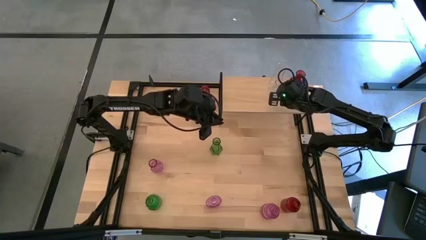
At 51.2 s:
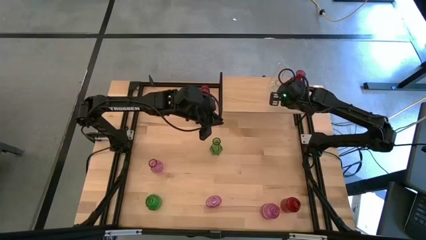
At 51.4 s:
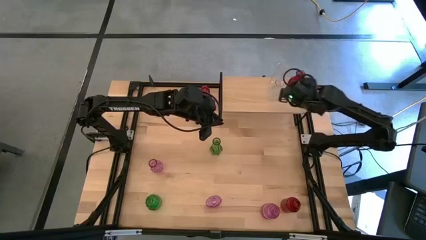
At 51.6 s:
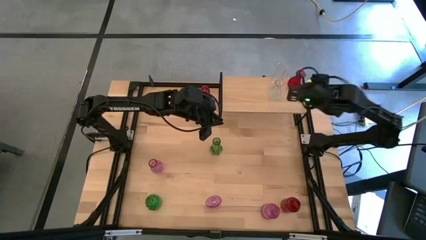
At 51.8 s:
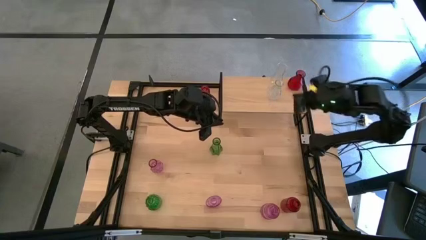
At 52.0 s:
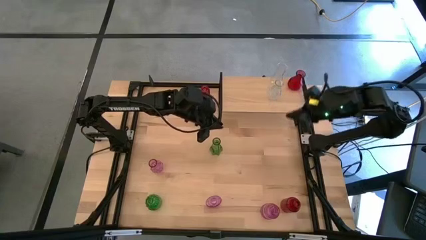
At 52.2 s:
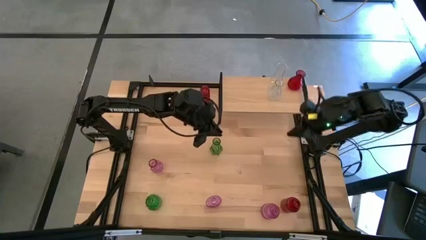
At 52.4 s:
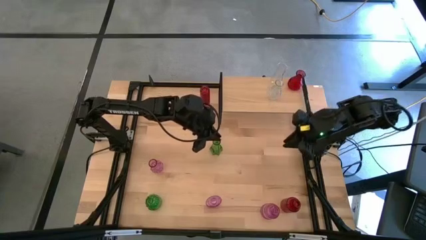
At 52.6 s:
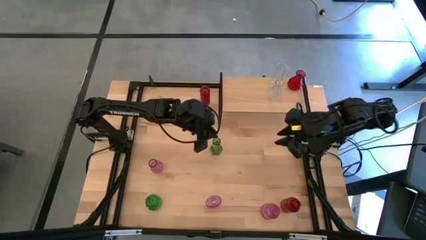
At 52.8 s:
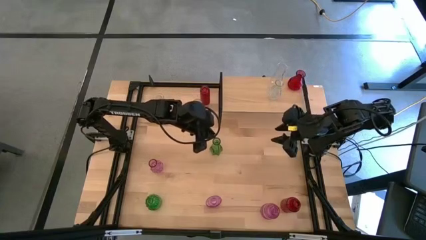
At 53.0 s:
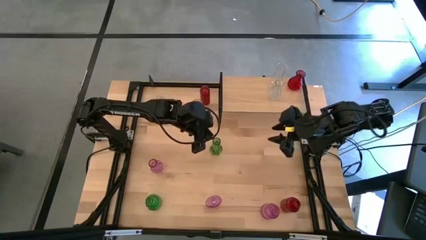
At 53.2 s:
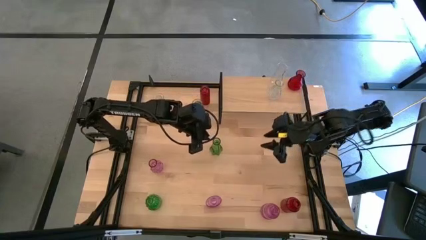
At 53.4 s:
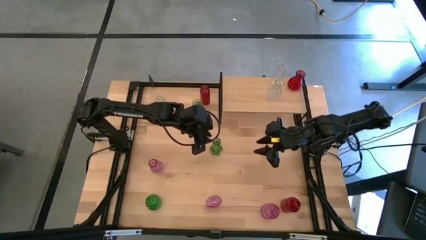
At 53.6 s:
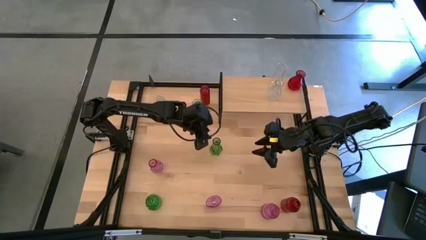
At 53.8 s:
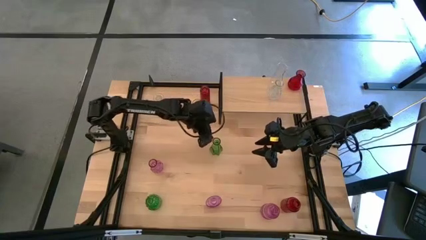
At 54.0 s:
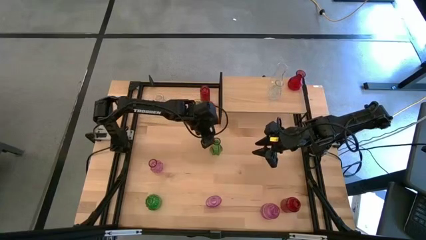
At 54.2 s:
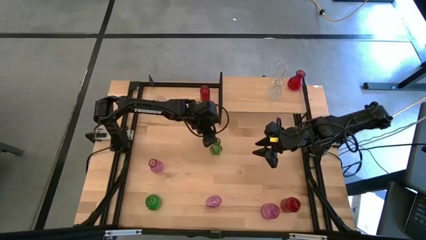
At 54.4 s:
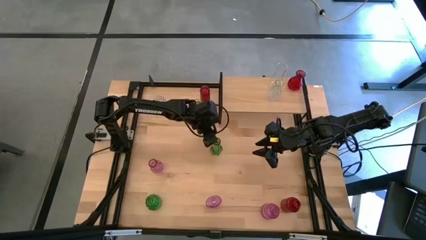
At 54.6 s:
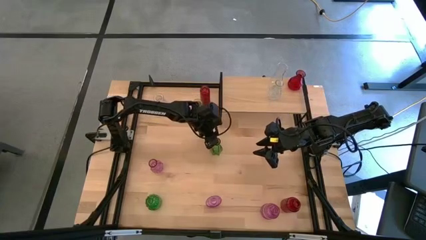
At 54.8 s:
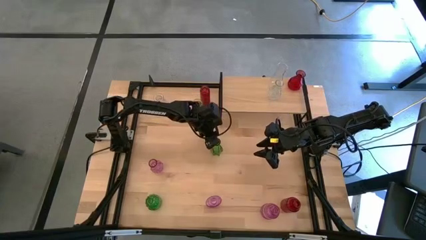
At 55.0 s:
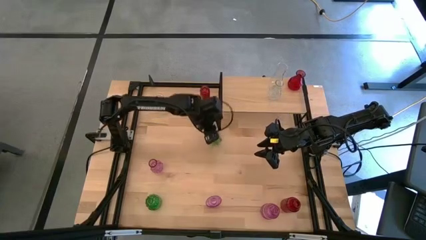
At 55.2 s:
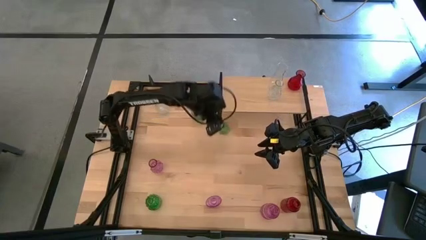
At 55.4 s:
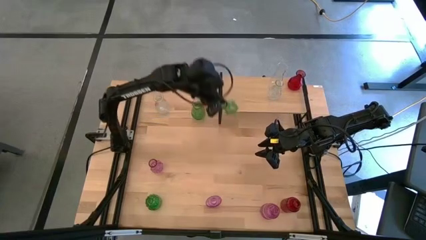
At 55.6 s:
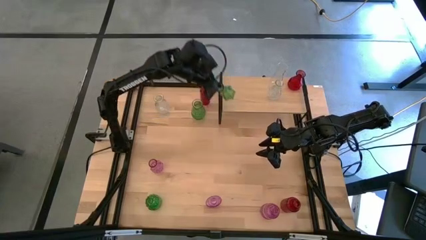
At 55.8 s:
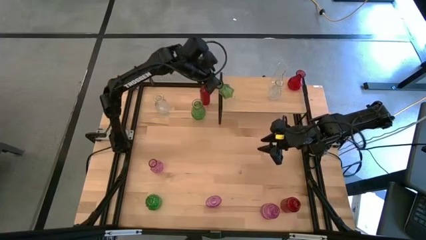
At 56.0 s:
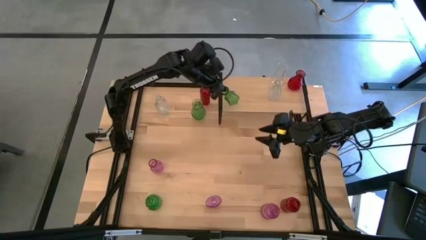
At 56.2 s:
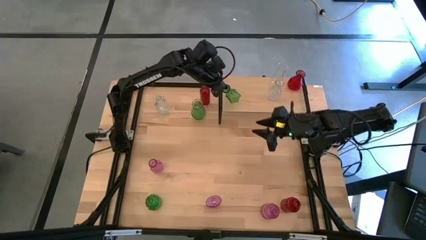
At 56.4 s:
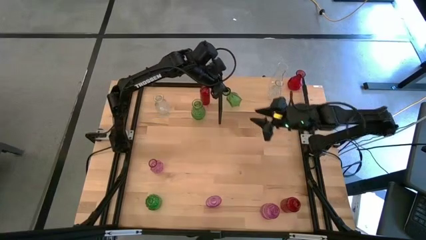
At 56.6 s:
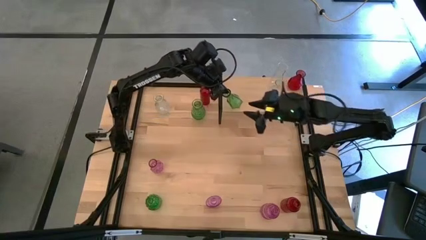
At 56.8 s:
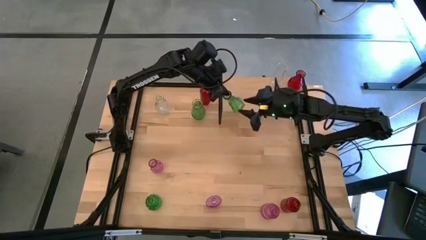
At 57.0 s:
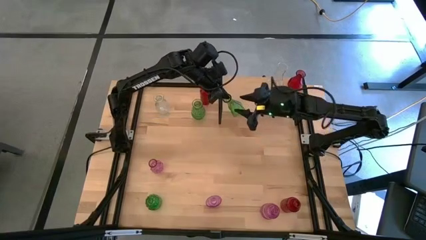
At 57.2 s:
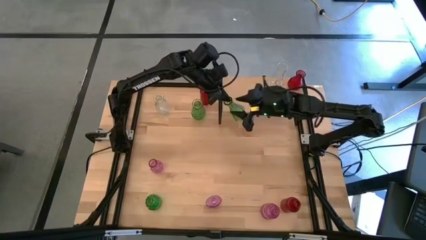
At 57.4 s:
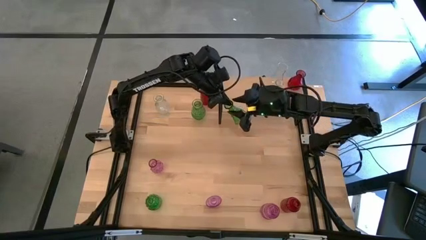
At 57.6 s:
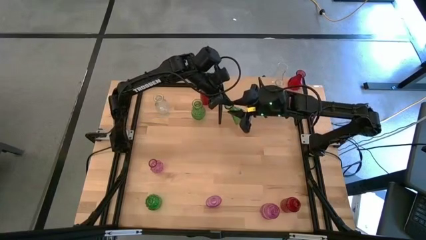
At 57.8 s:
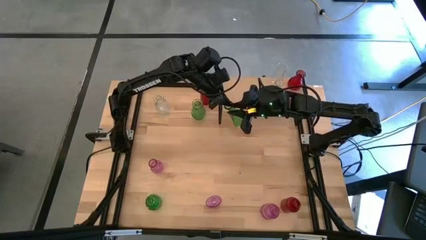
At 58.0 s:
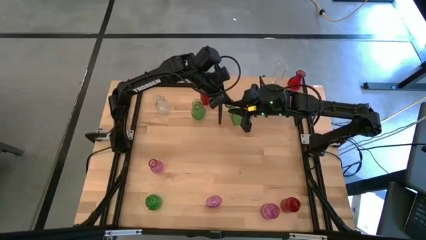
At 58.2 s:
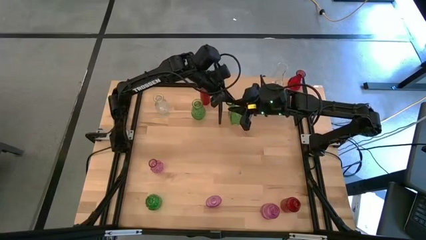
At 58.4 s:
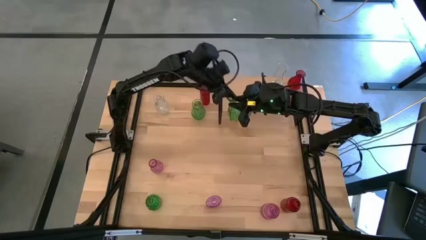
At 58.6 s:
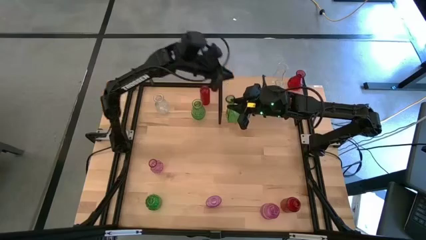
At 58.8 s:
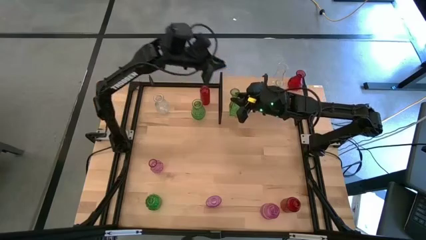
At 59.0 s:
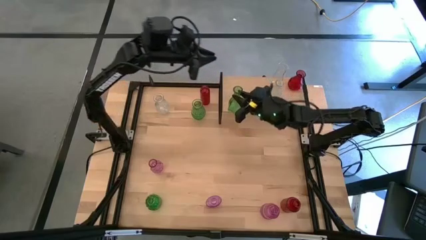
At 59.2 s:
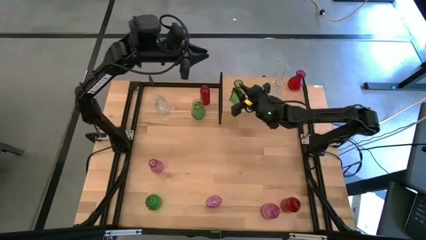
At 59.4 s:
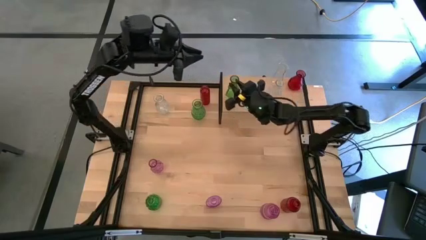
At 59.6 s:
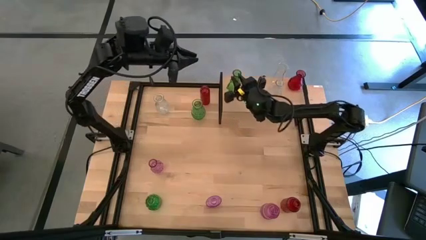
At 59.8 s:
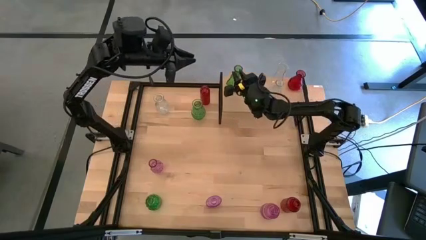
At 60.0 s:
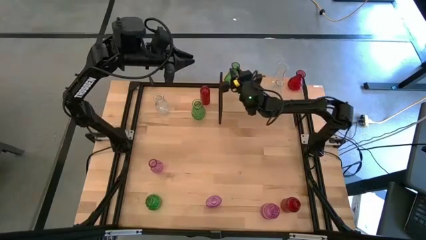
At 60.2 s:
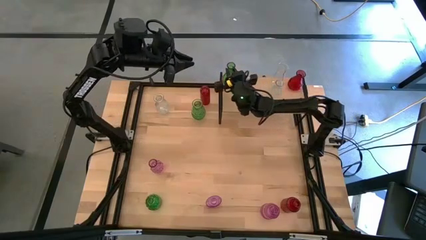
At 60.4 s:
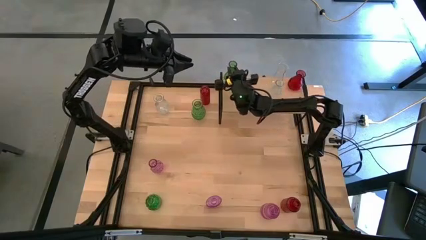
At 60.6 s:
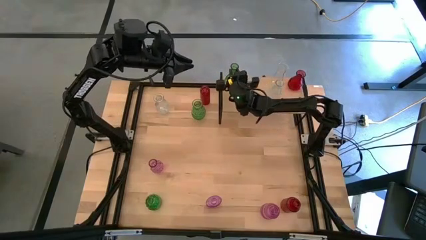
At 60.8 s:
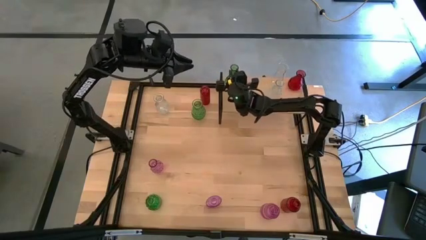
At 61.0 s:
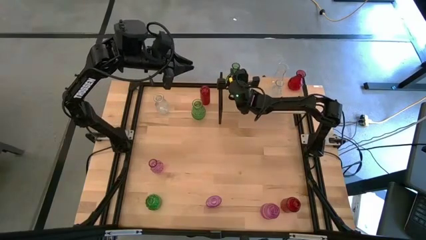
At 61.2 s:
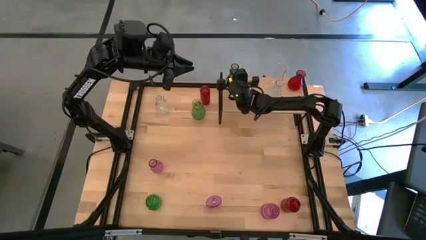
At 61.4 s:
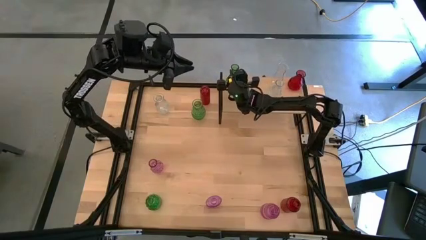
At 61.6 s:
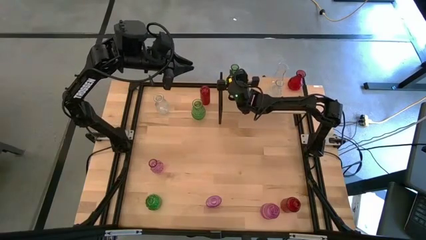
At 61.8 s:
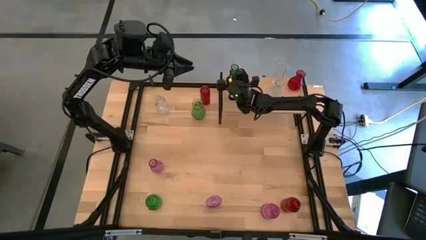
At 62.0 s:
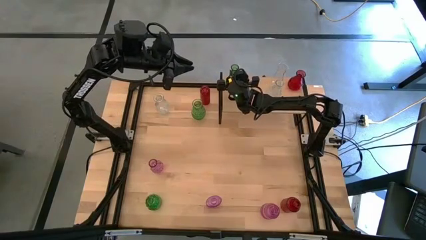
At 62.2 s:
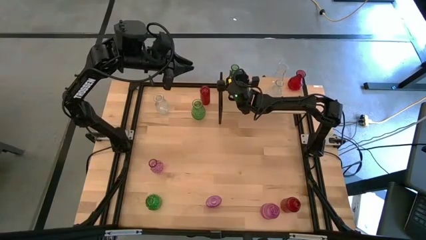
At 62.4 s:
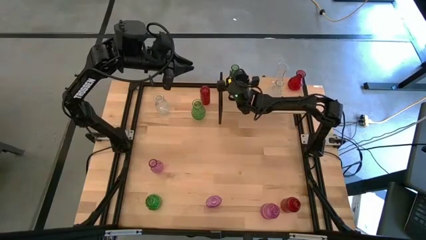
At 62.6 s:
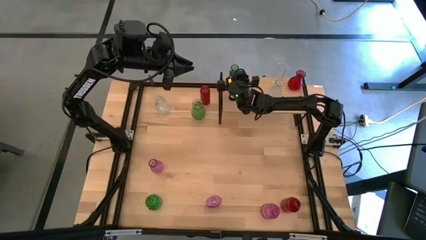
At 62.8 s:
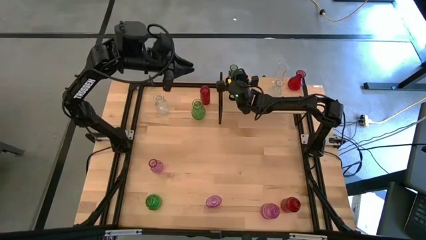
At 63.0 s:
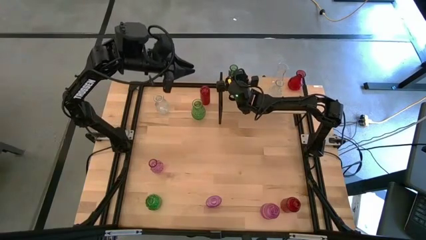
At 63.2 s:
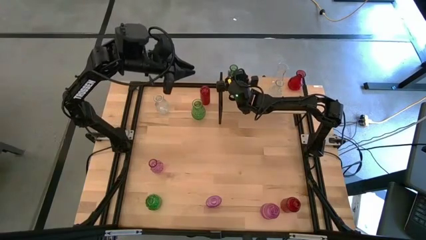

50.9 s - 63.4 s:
Task: sort vases onto shelf
Put the middle right green vase on the shelf

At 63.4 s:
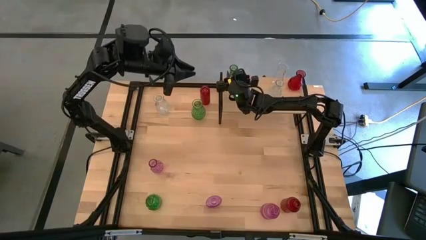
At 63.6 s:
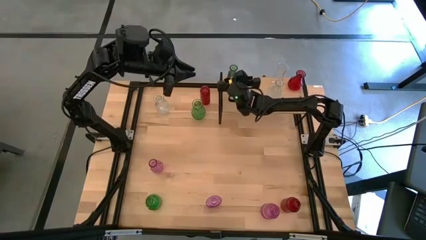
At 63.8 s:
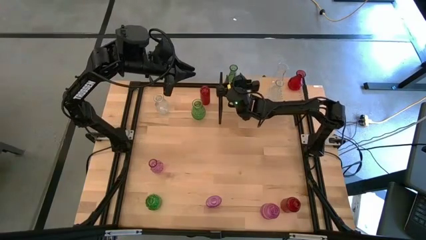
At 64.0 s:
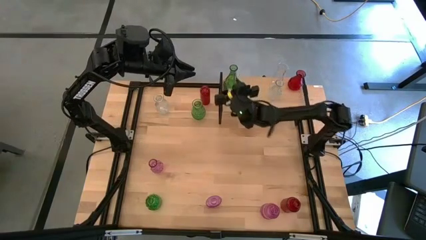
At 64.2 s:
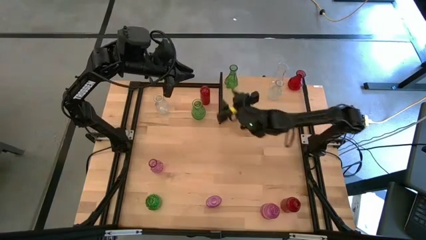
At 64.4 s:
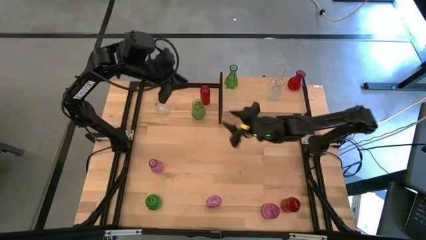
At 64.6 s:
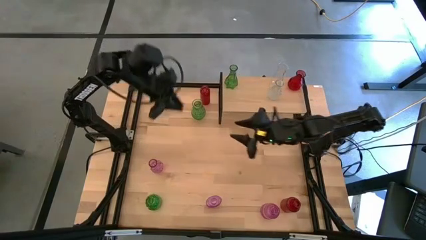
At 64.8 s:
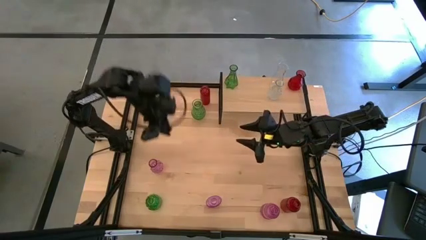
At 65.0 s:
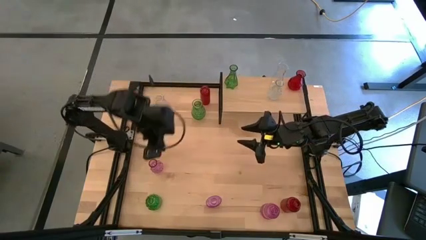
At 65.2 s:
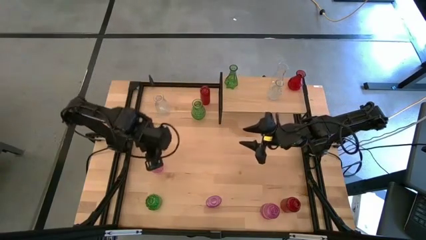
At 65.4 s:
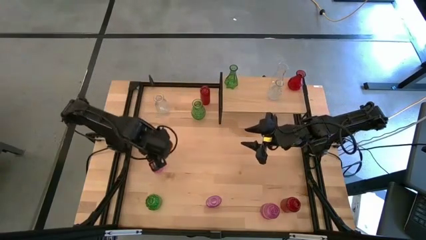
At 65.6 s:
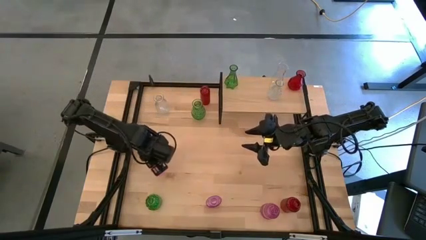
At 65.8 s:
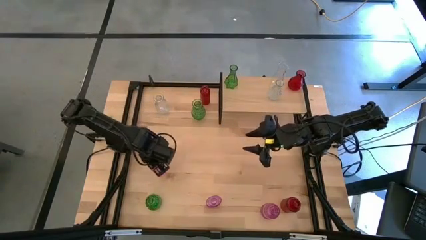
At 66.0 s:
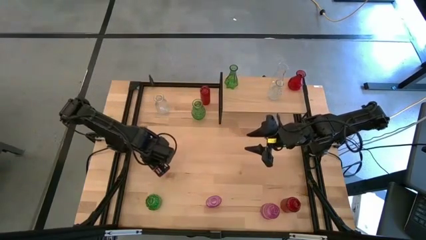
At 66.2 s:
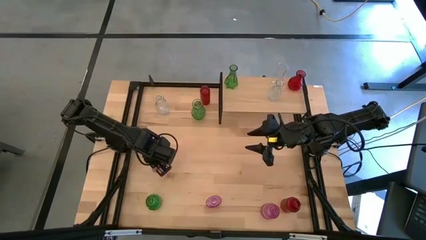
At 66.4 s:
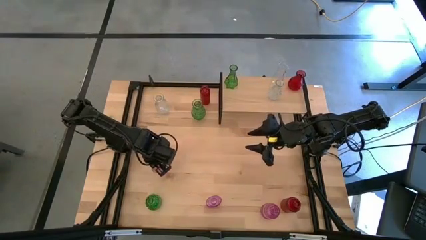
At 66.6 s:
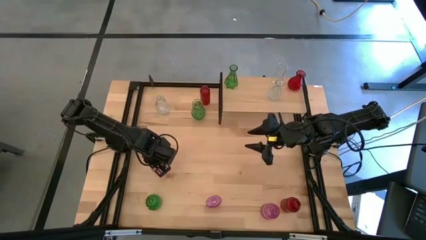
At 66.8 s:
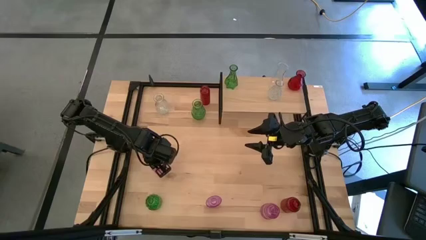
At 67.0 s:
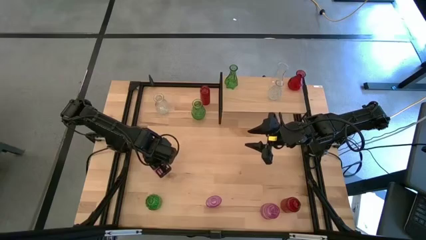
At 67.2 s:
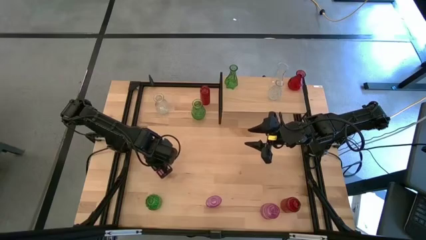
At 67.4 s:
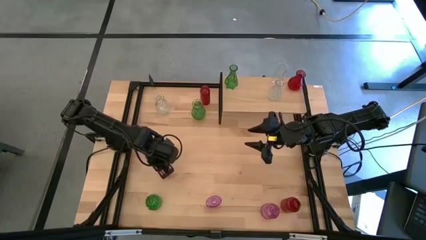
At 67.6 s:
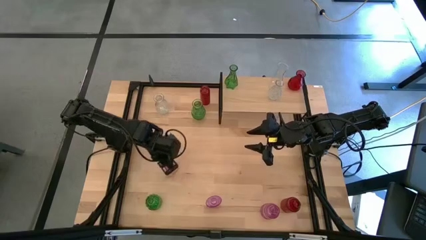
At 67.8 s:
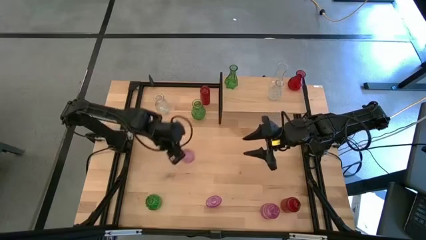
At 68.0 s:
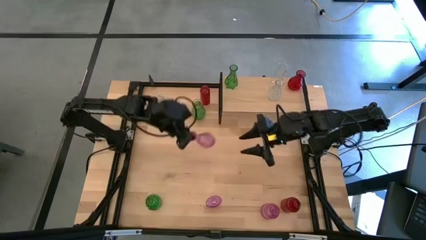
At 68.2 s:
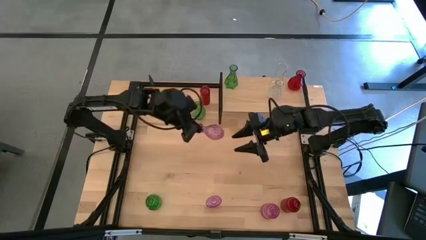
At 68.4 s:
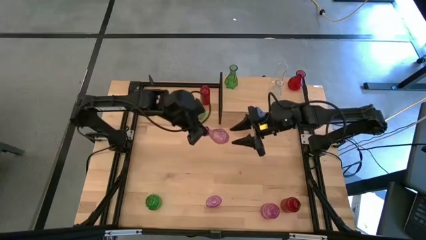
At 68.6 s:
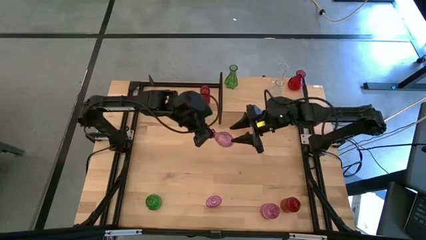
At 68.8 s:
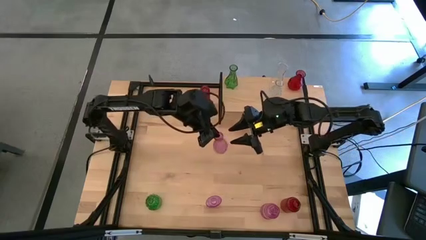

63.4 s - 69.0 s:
Put the top pink vase on the shelf
